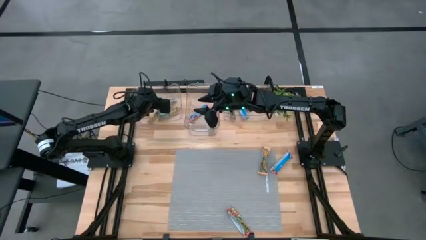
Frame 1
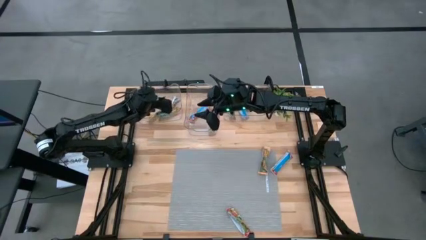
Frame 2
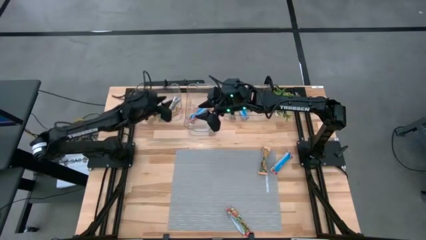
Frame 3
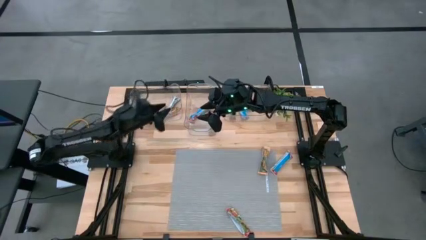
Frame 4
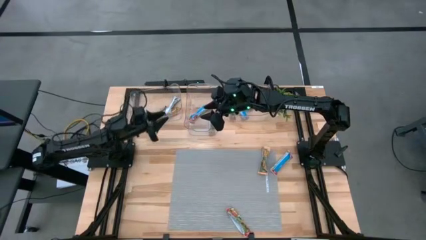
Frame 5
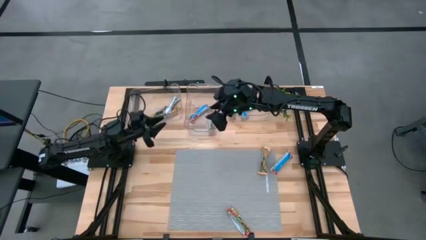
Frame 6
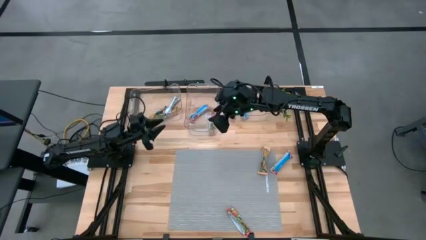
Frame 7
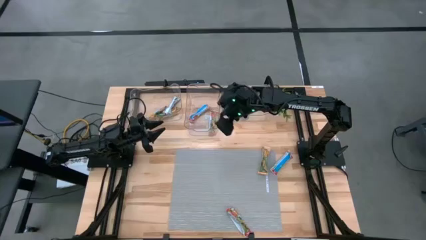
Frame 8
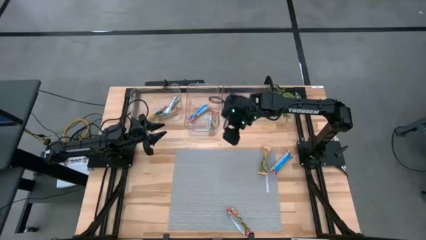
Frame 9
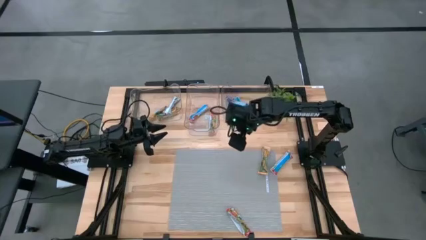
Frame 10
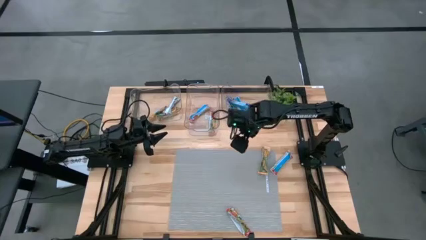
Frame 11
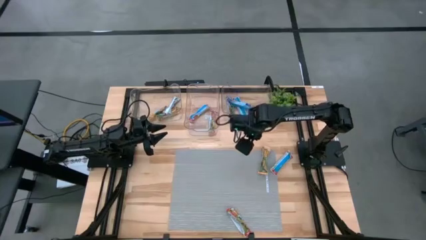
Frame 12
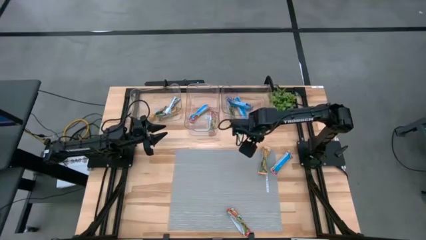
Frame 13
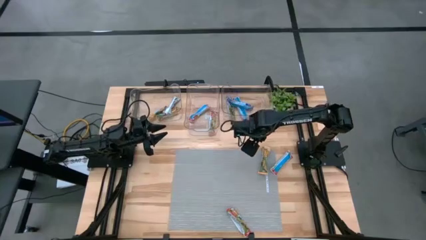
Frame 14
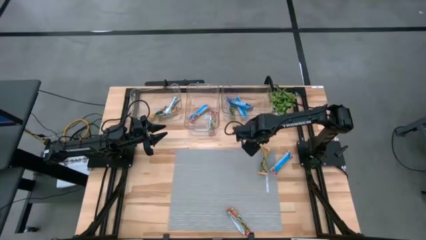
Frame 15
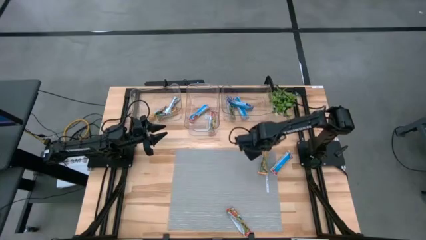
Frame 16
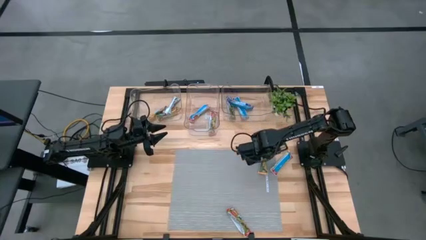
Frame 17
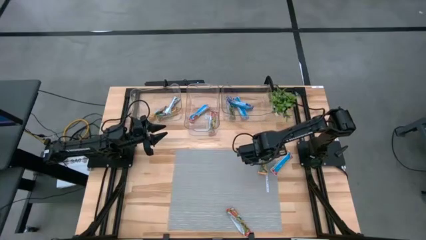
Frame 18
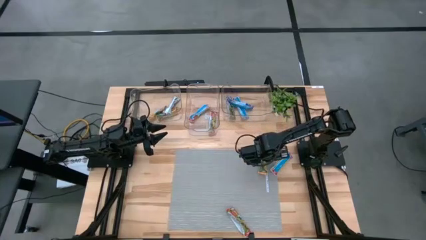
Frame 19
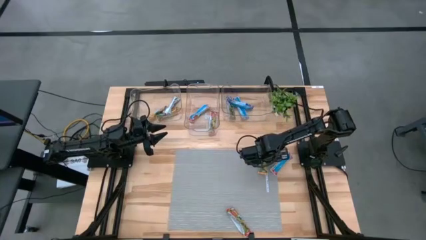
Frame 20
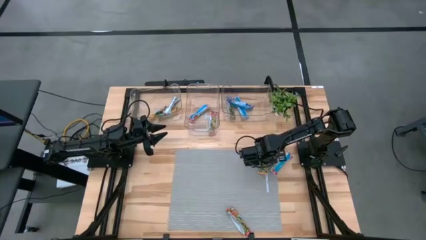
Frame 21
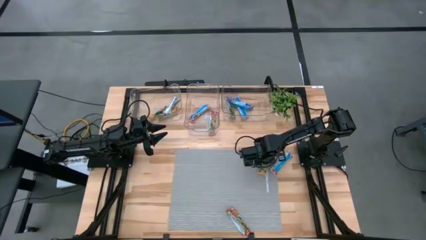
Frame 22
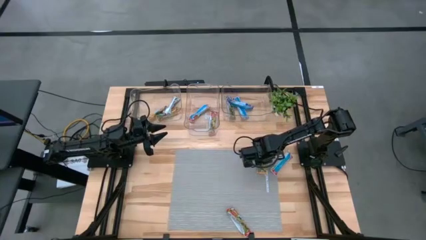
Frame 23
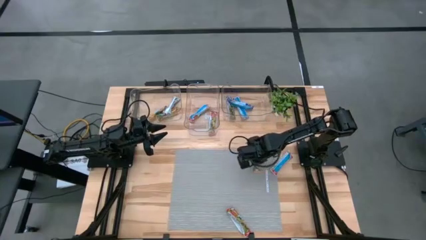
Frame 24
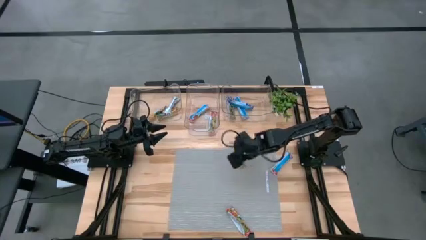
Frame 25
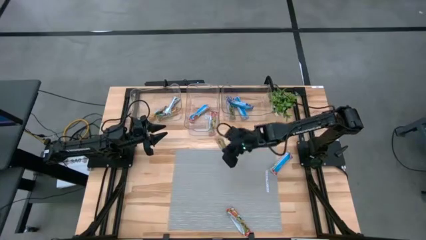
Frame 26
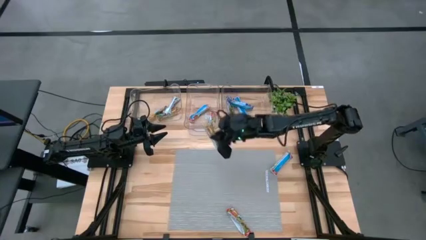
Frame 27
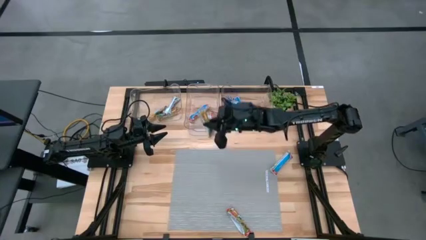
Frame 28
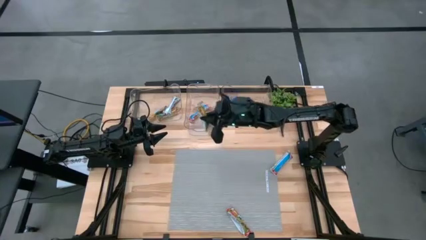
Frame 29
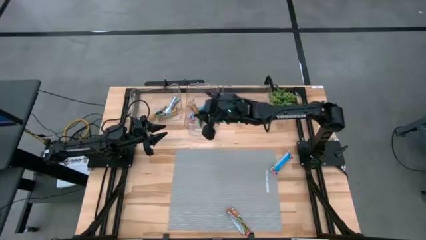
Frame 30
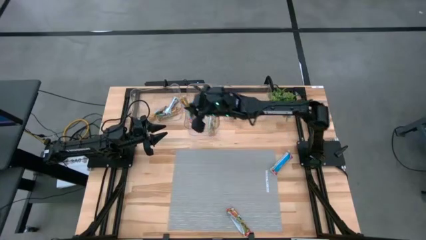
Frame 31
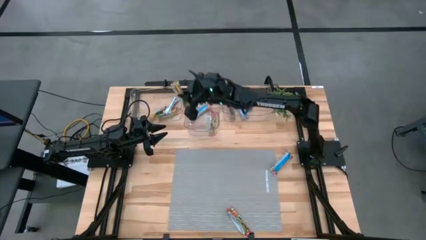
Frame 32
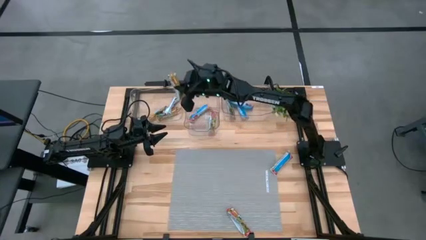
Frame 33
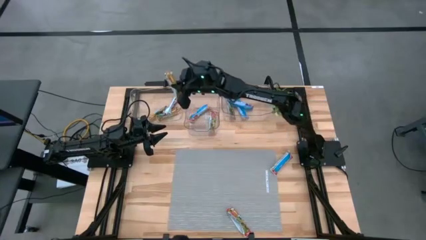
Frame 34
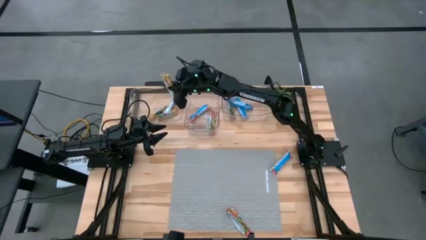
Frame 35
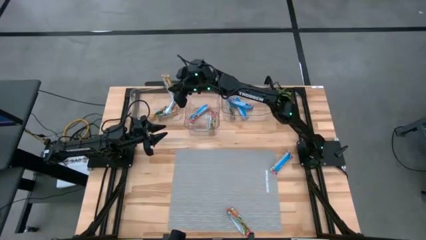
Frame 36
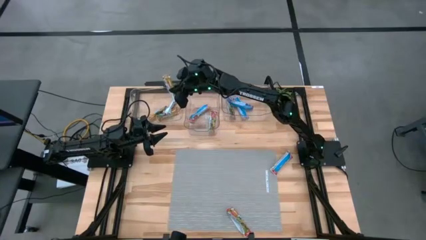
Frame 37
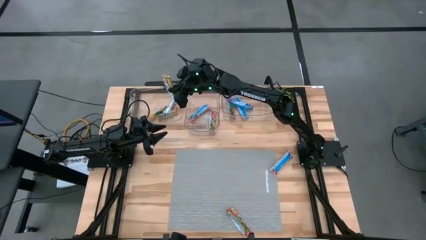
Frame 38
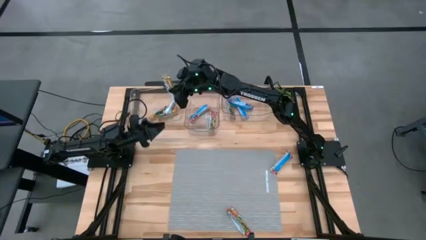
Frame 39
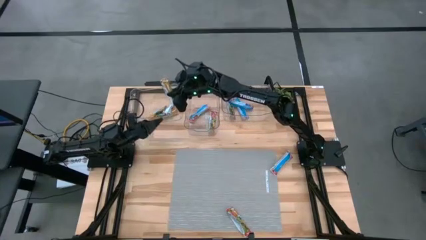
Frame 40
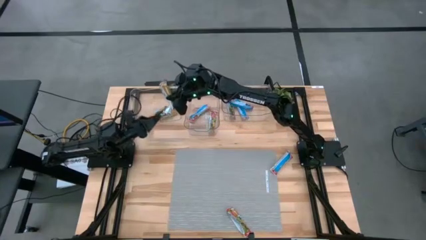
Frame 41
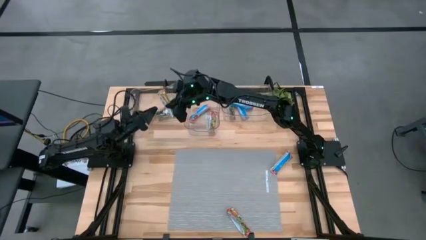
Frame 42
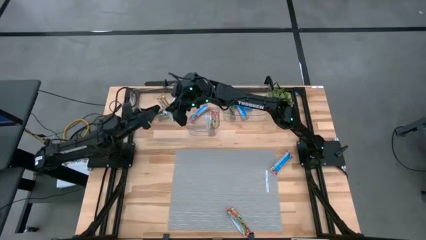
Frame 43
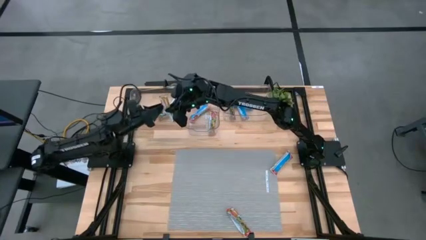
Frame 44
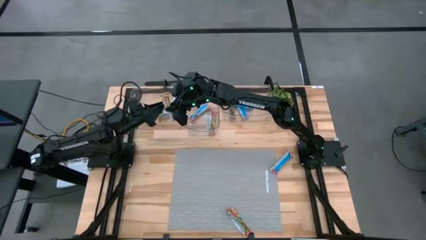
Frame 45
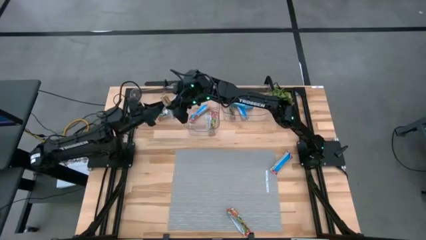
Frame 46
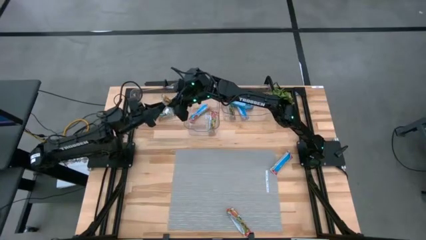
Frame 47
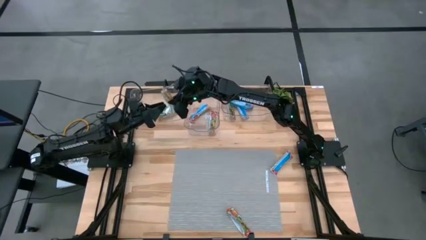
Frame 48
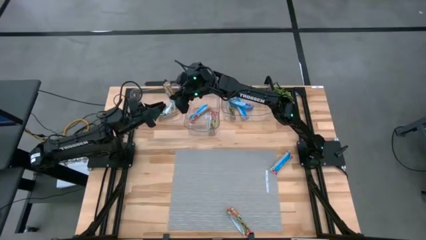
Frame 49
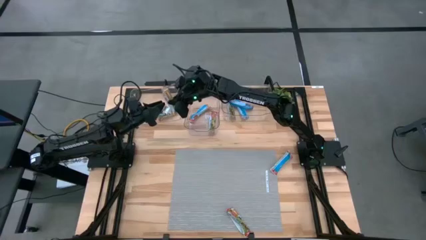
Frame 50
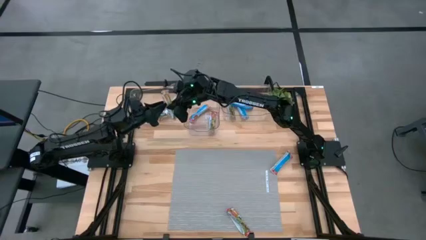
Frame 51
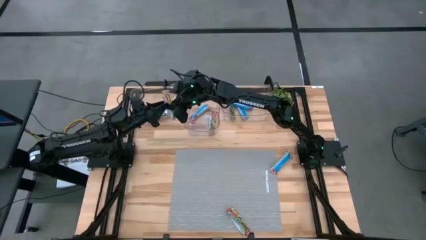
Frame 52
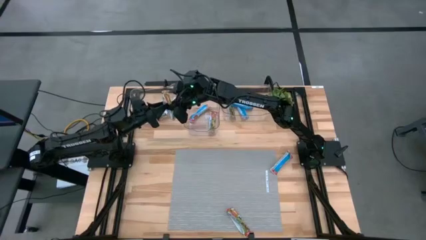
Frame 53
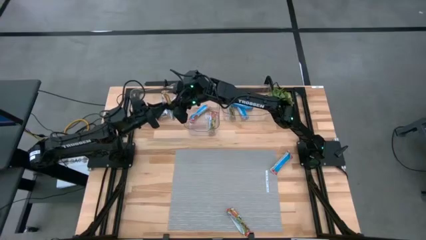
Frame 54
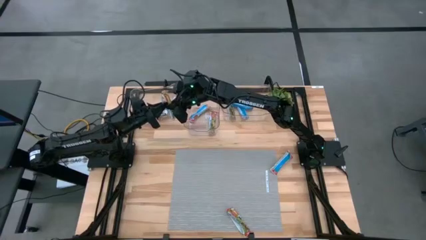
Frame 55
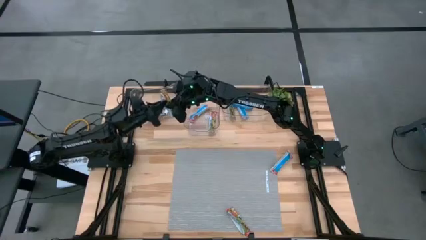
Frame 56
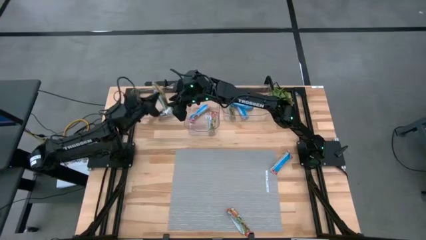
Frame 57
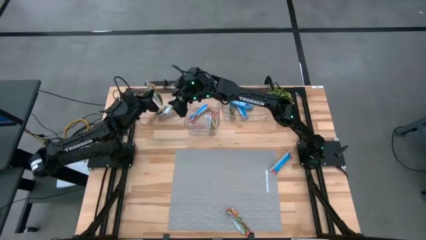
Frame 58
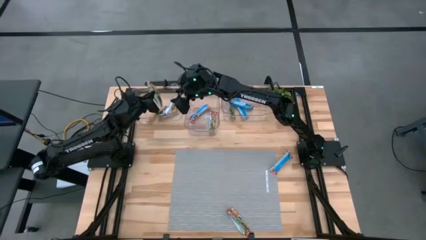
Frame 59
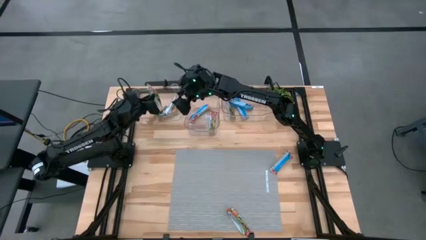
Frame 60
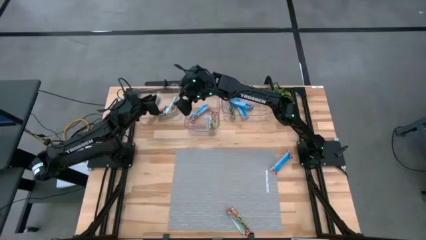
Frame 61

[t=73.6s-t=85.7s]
Task: Pick and place Granola Bars by type
Put the yellow granola bar into the left transparent bin

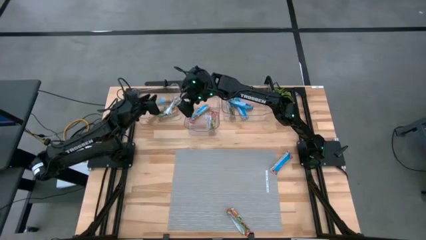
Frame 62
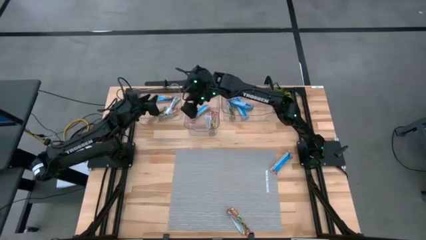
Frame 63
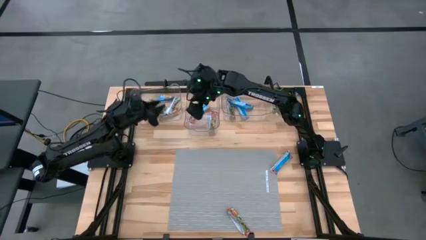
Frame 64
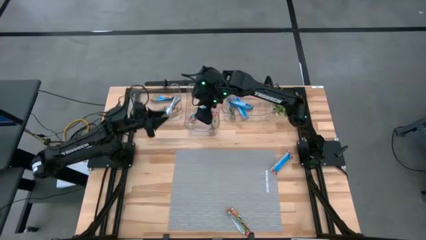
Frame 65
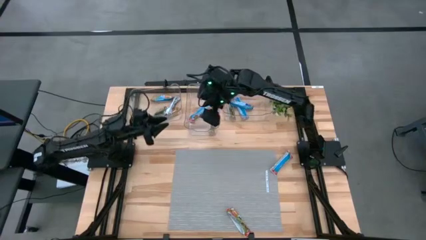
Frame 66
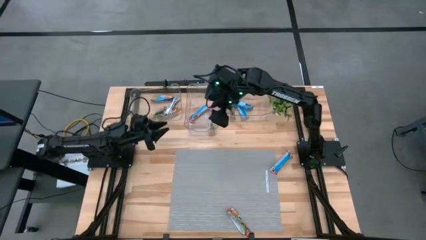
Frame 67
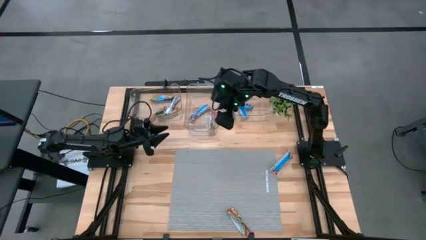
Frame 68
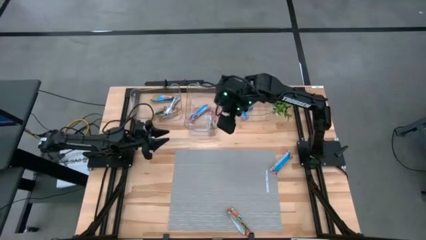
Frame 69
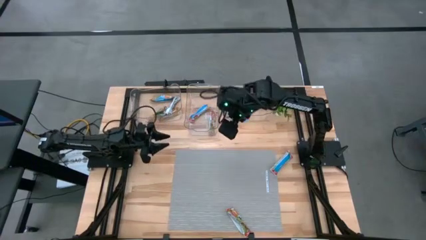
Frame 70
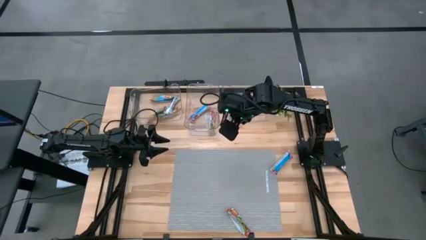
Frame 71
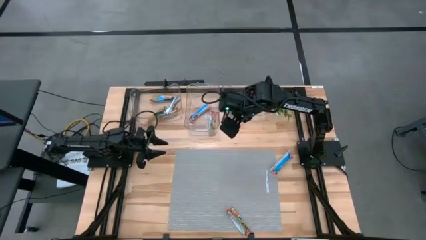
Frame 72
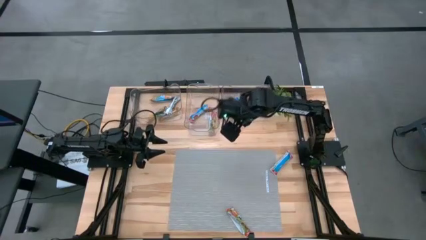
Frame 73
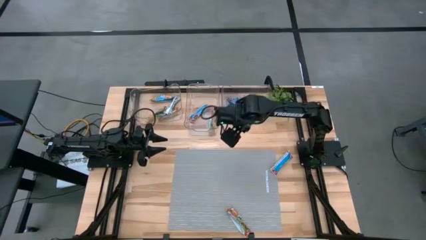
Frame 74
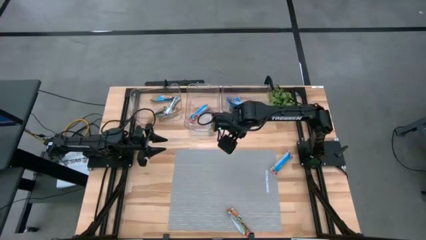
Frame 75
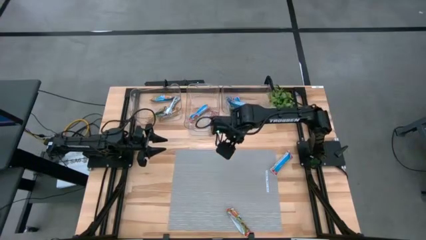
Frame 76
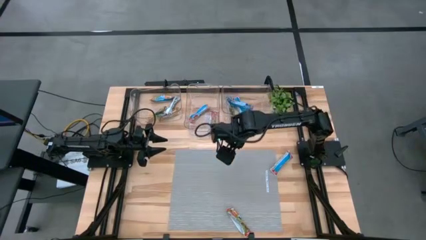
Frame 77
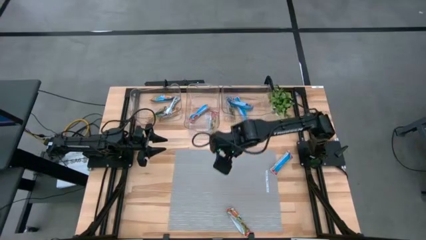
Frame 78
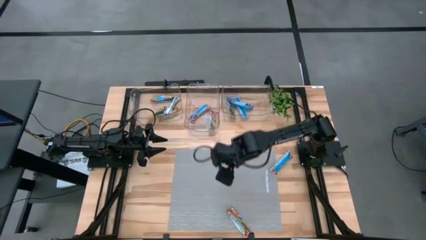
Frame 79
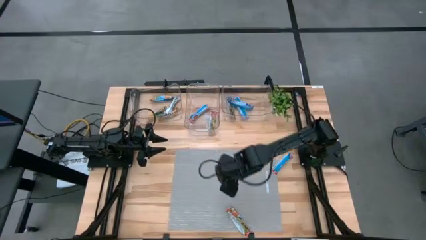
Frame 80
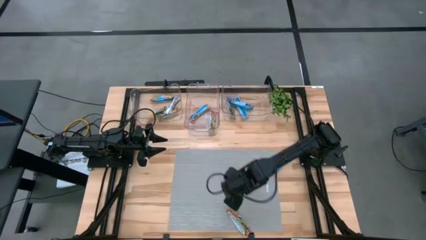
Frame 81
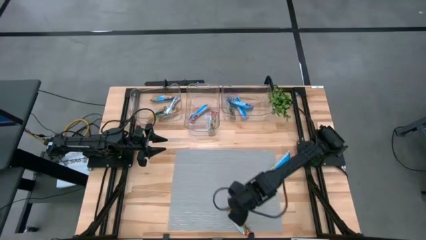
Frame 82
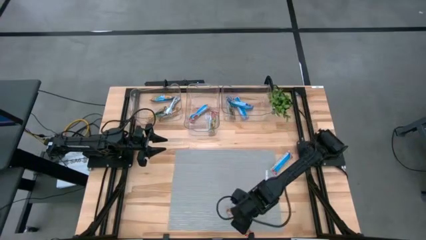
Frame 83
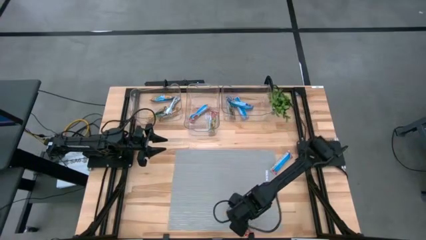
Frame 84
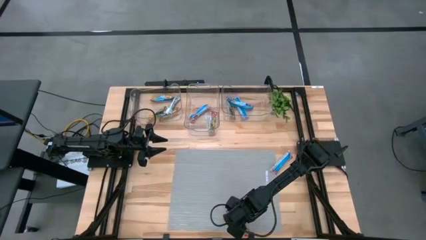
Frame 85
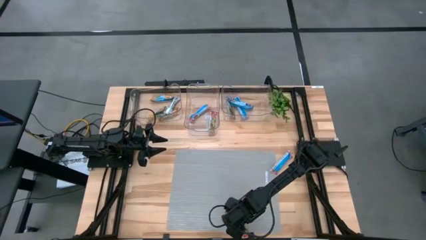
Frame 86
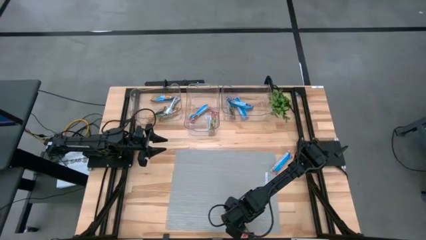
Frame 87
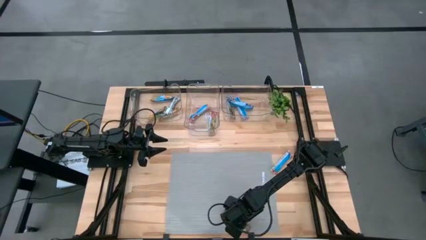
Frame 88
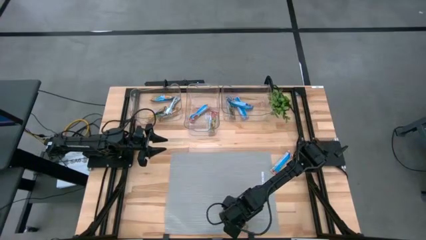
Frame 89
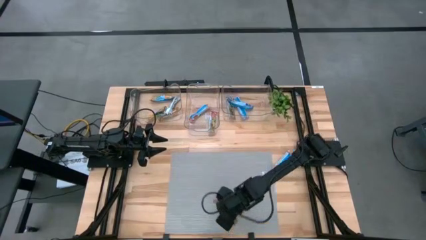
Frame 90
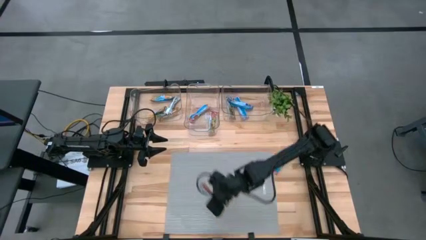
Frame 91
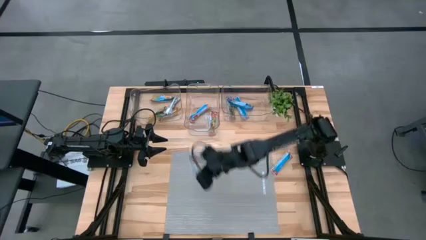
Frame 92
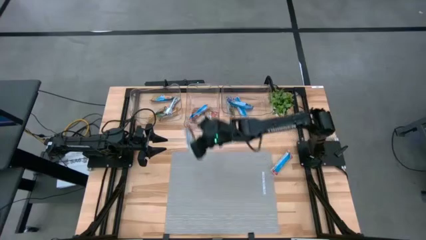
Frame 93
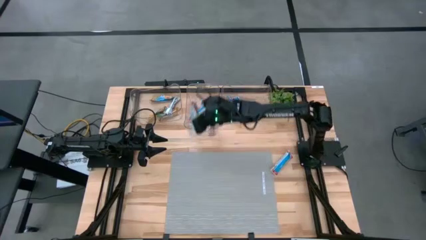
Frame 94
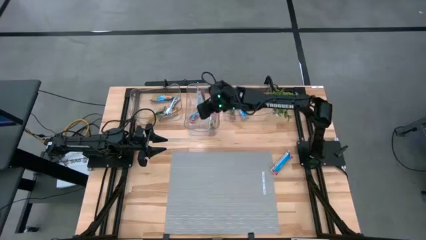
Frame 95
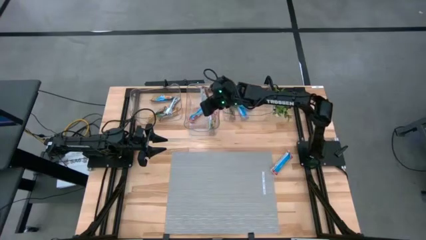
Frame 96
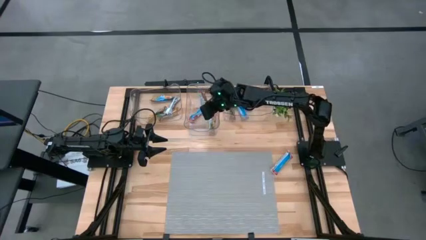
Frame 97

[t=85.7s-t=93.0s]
Put the red granola bar into the middle transparent bin
